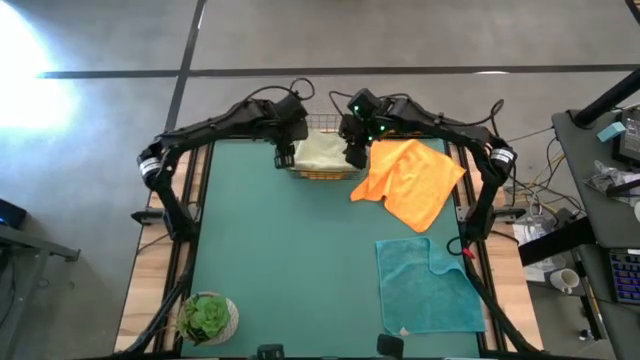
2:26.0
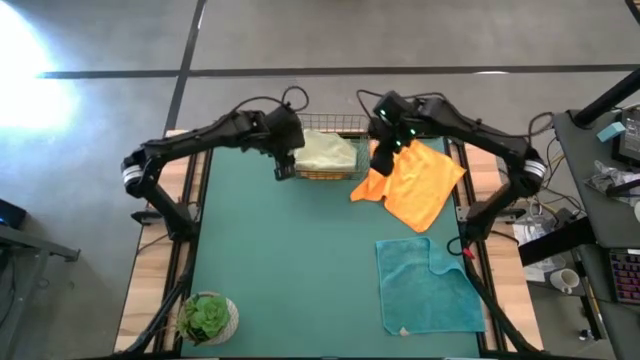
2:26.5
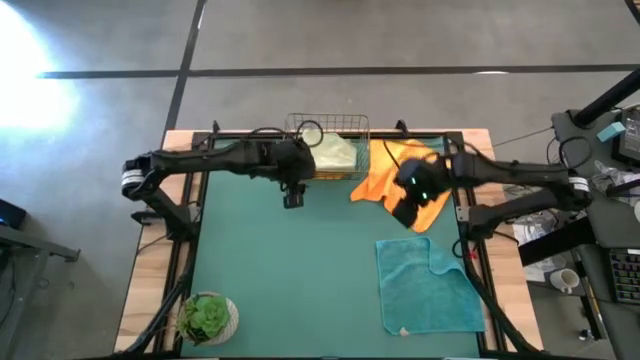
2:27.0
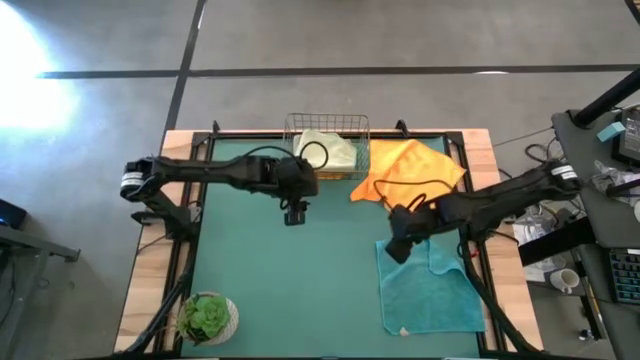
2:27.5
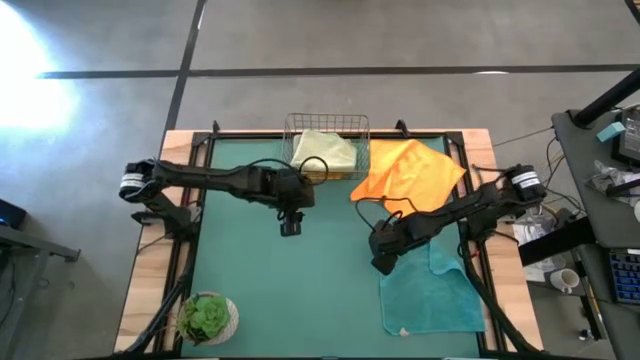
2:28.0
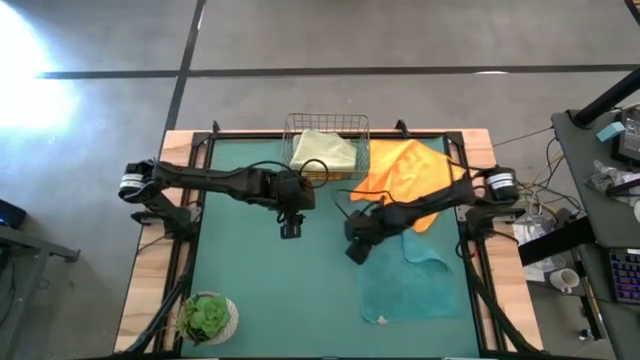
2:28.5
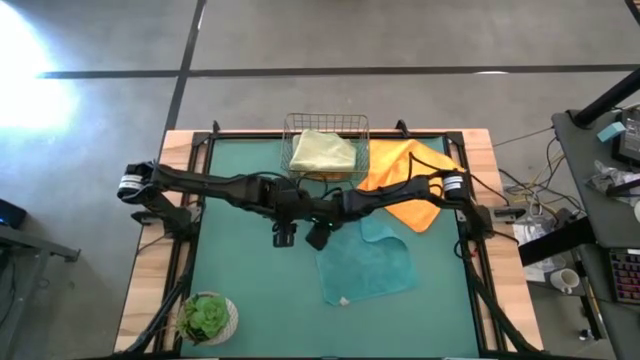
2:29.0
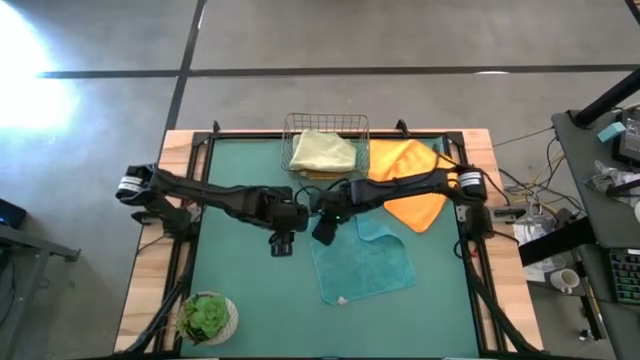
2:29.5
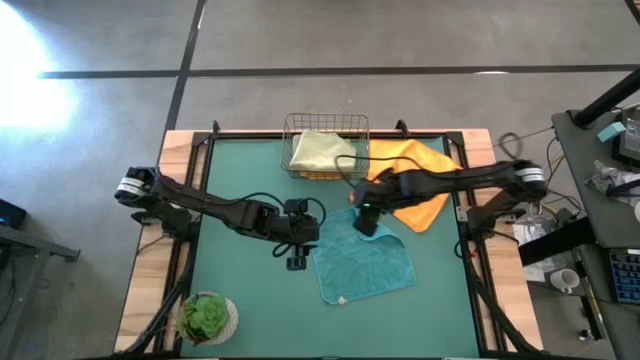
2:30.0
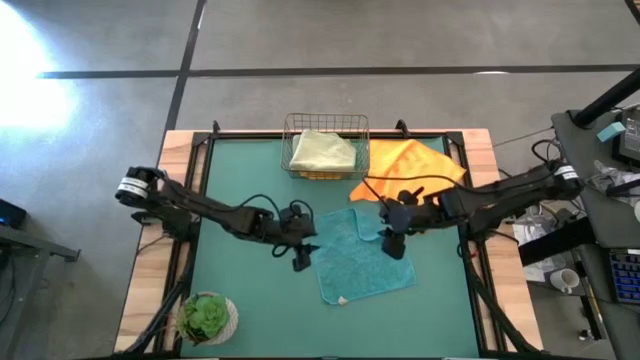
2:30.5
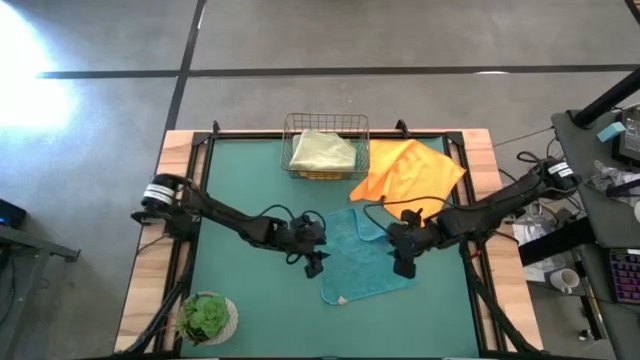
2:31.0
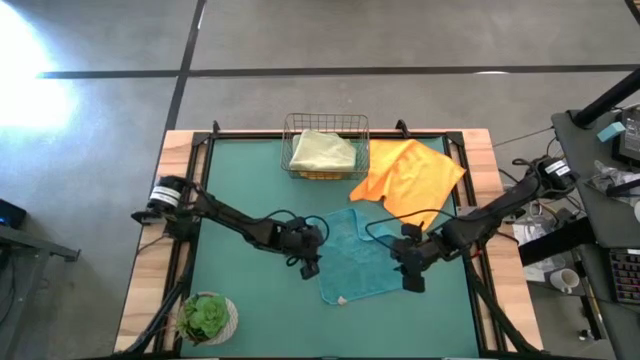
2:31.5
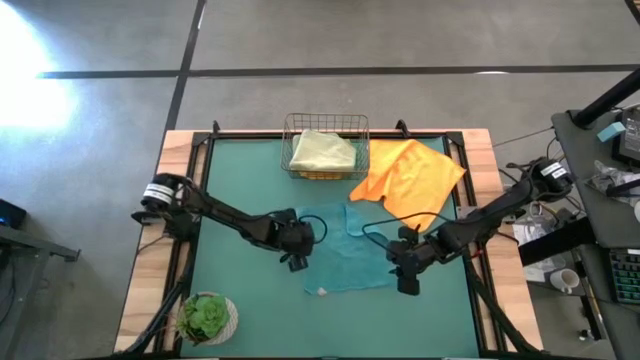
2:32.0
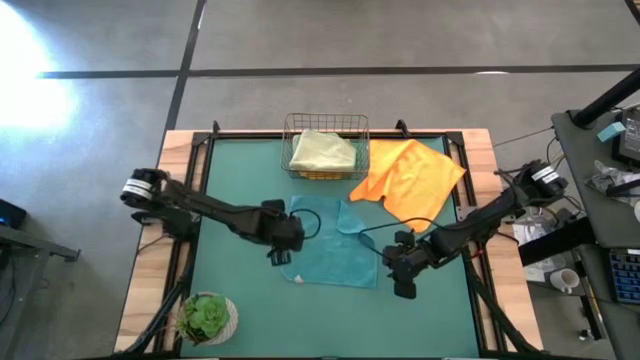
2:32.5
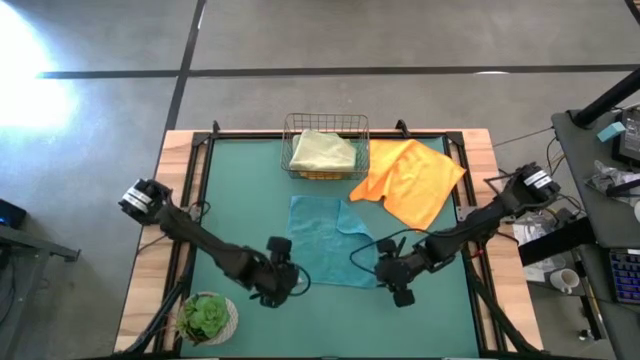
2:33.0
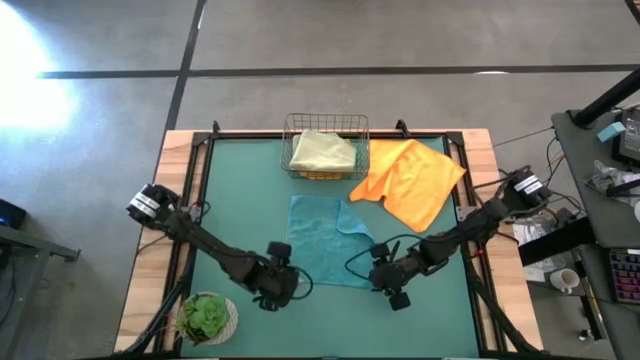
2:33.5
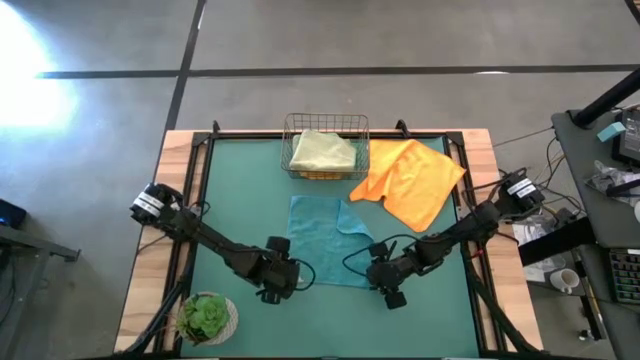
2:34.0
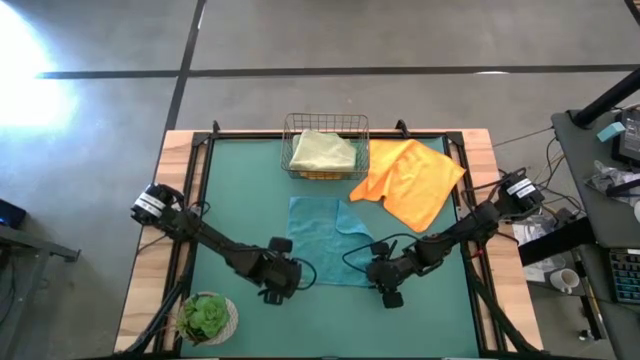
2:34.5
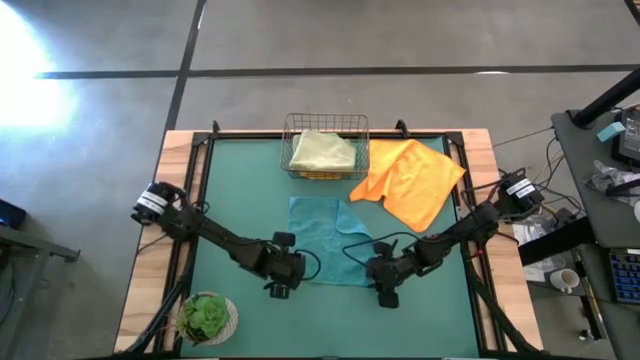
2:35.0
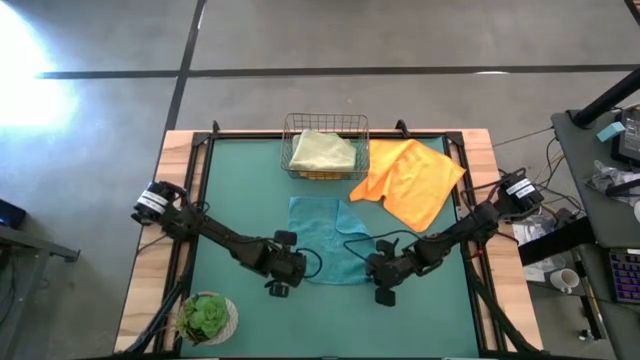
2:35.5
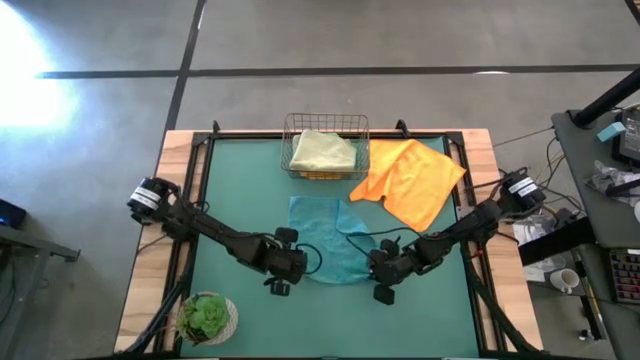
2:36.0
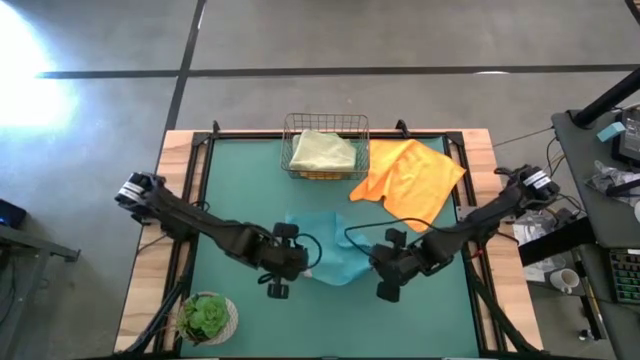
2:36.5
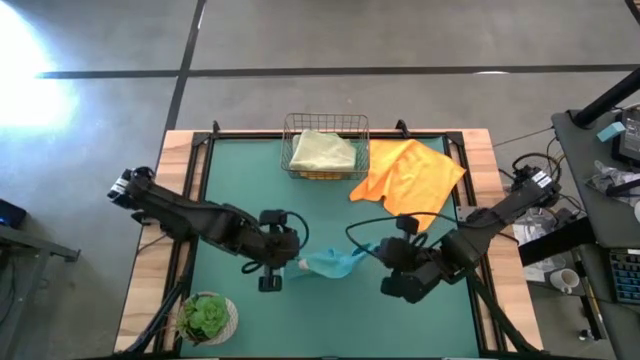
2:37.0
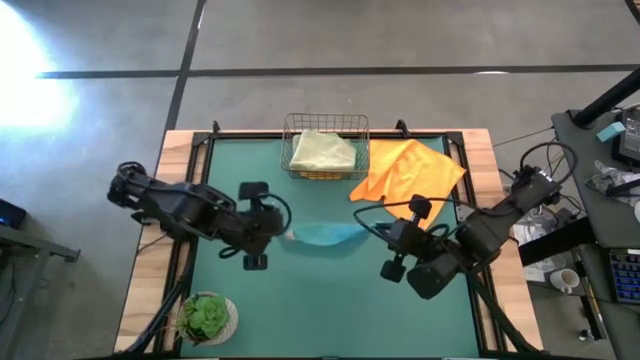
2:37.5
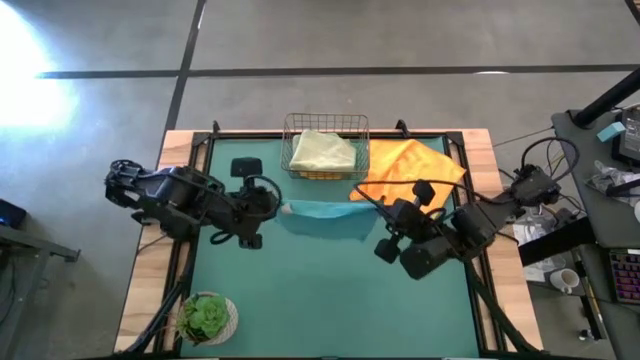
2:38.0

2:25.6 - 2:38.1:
Task: Fold microfiber towels
Fold the blue microfiber towel

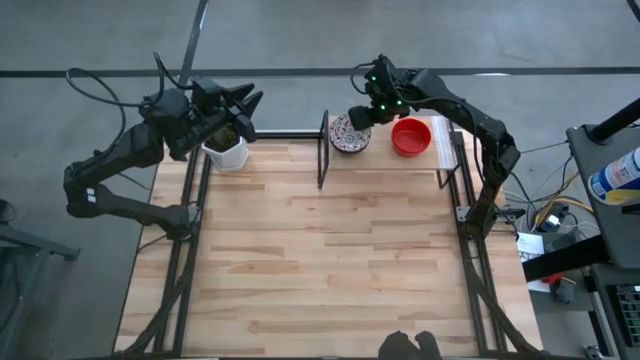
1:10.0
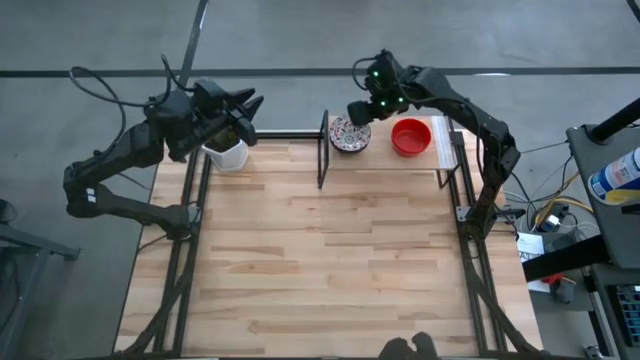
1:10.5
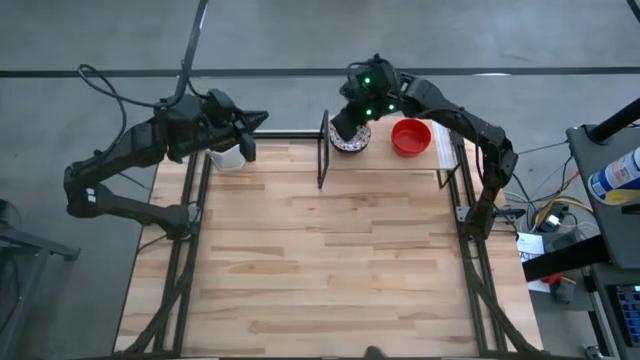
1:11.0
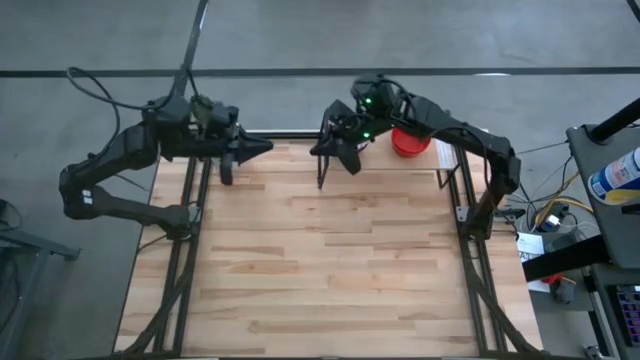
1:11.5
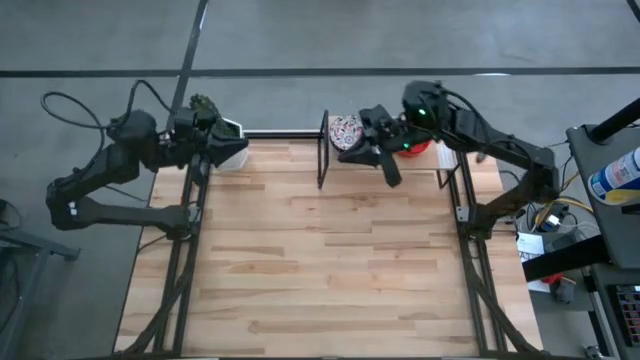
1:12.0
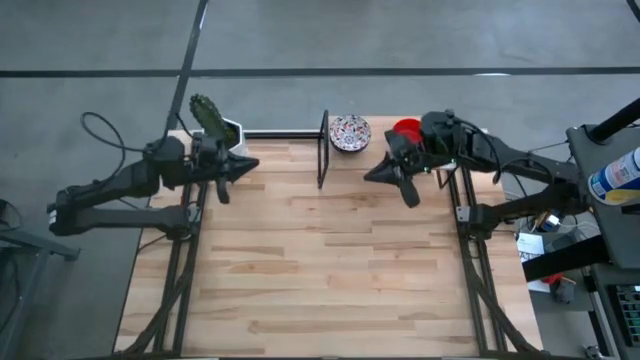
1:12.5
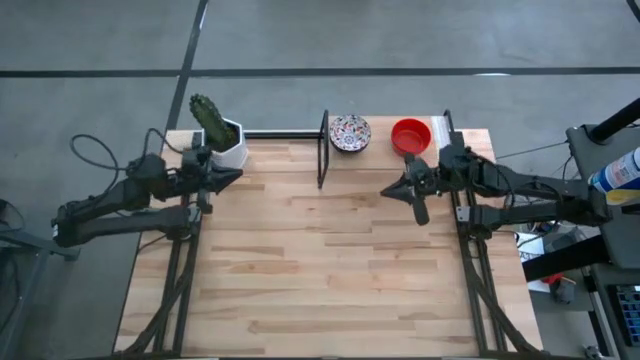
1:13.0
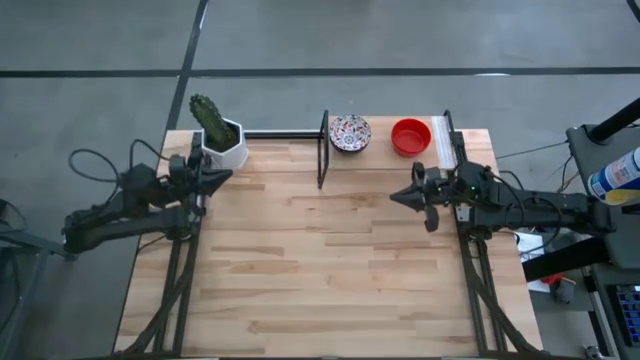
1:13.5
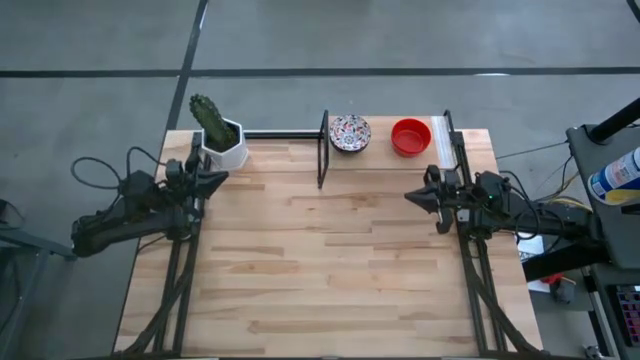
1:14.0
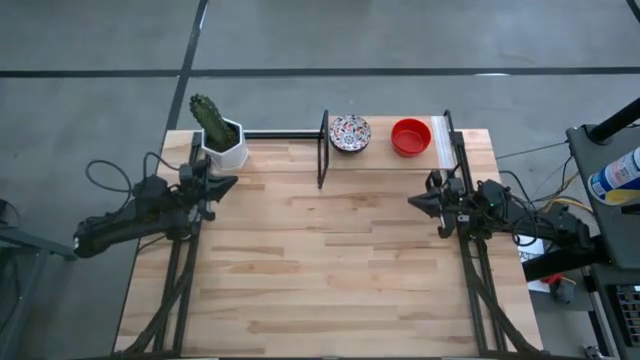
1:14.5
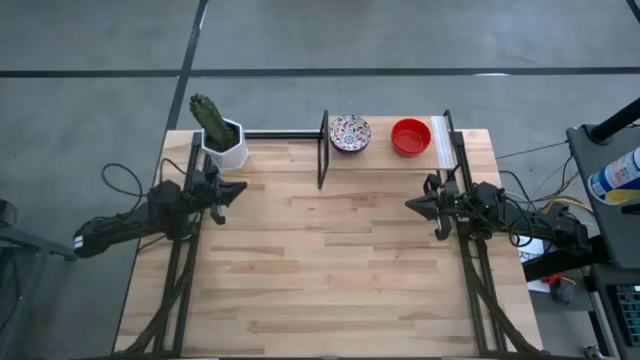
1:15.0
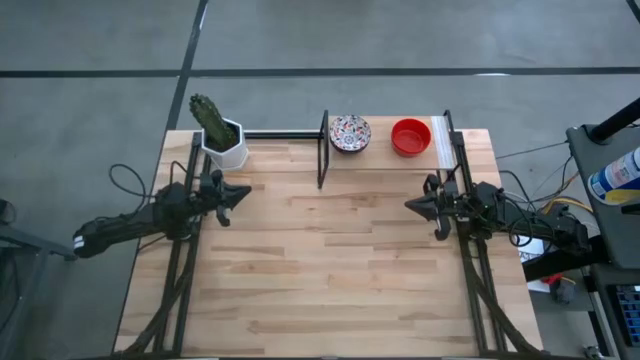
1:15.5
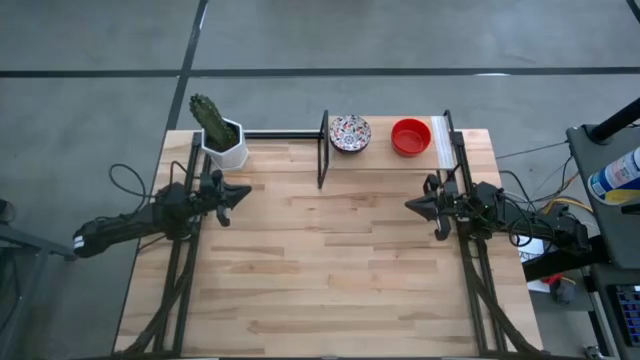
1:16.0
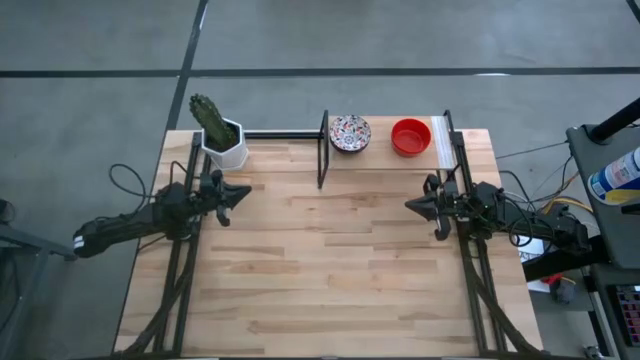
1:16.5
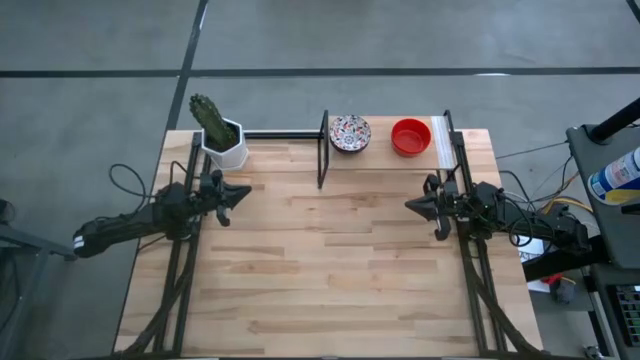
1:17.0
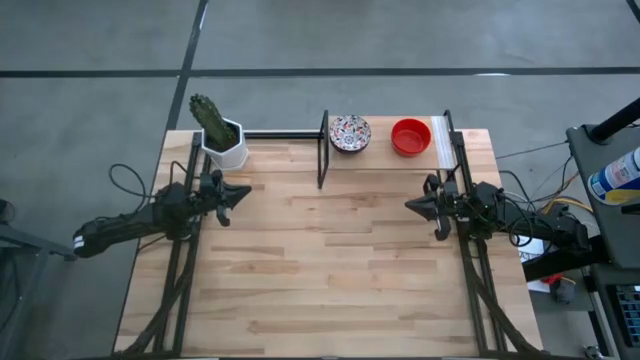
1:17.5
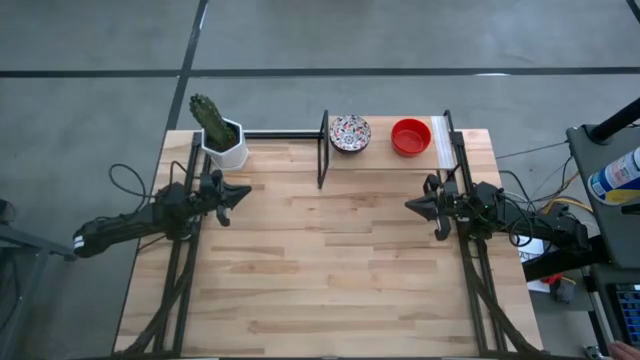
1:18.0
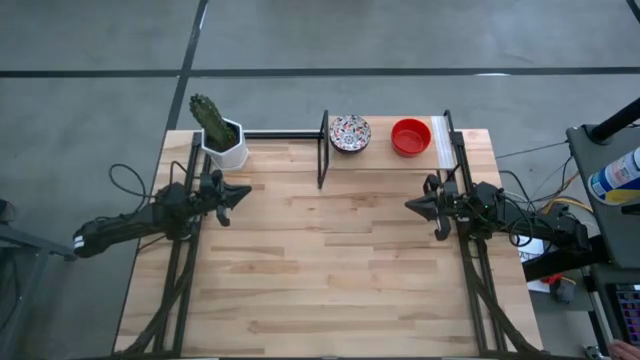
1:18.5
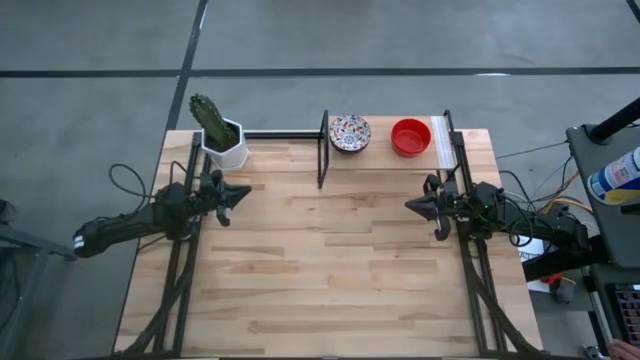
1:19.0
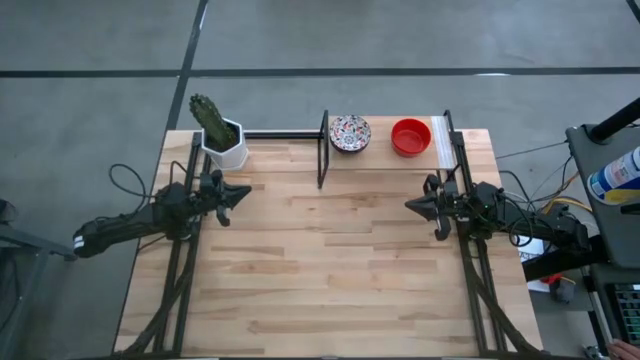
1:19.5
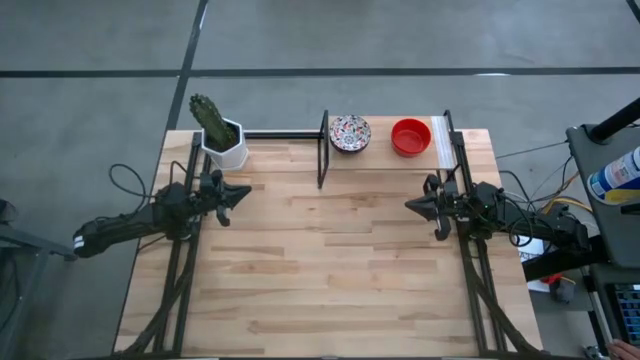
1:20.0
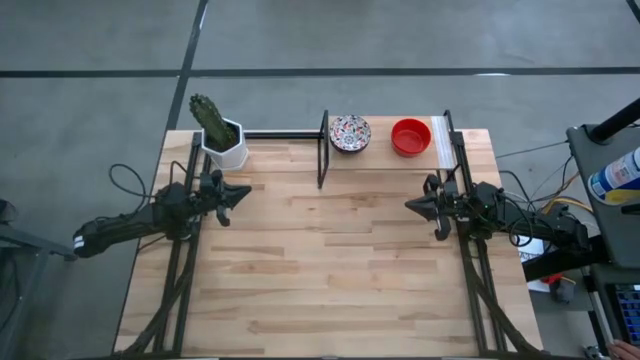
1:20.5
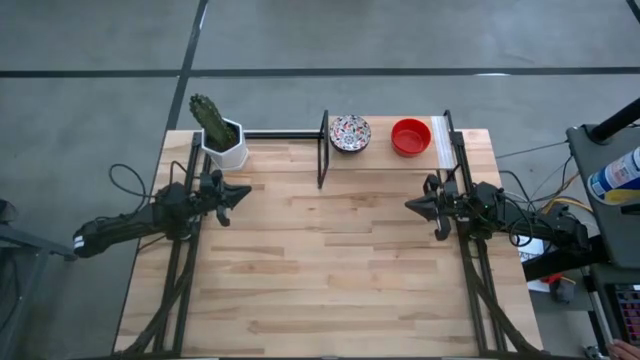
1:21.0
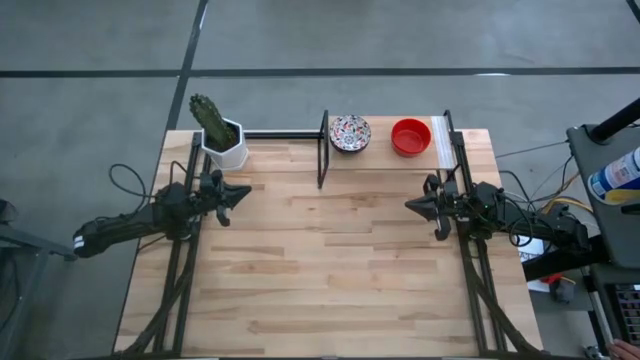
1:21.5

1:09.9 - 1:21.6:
Task: Pick & Place Mini bowls
Return to Home Position
